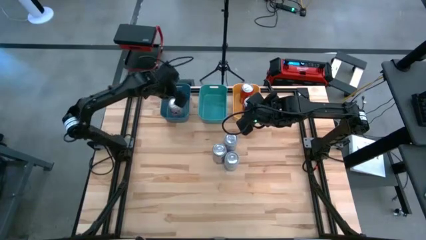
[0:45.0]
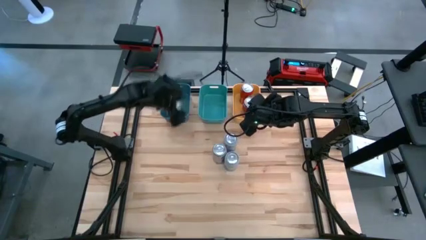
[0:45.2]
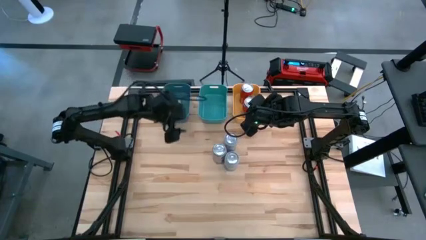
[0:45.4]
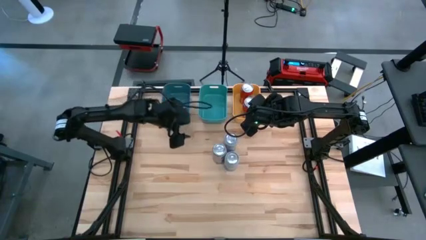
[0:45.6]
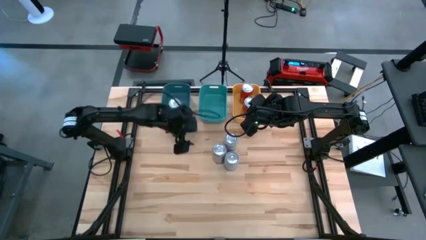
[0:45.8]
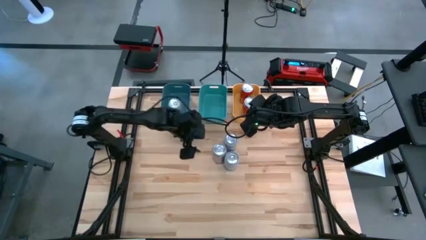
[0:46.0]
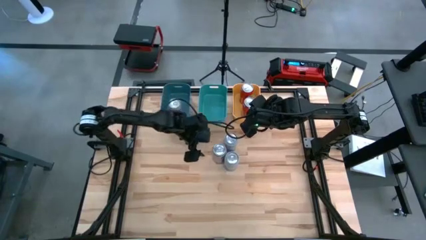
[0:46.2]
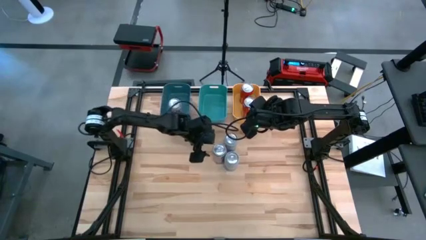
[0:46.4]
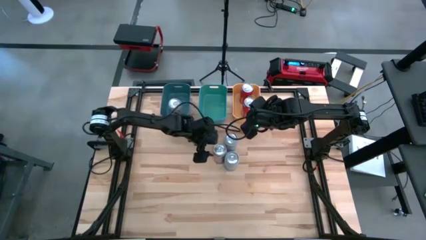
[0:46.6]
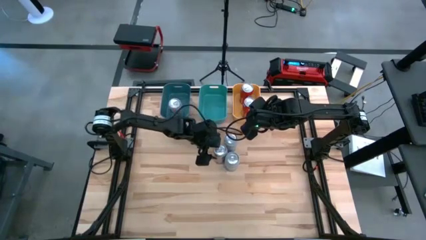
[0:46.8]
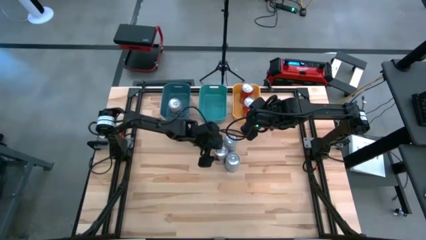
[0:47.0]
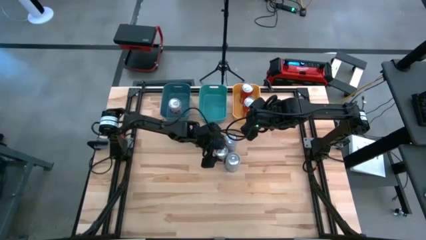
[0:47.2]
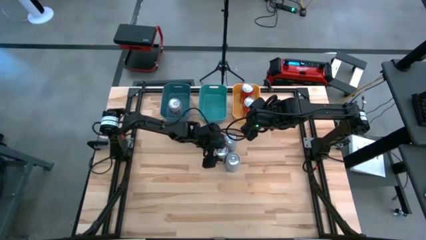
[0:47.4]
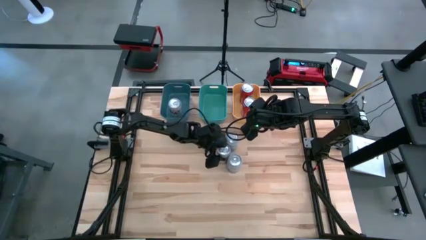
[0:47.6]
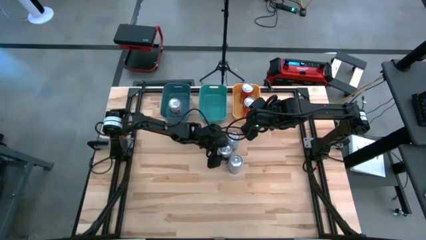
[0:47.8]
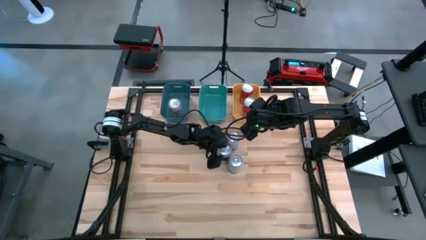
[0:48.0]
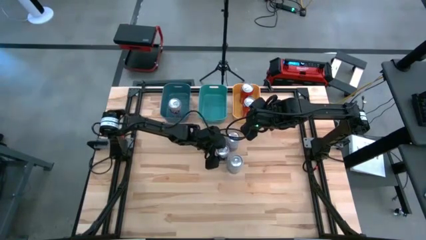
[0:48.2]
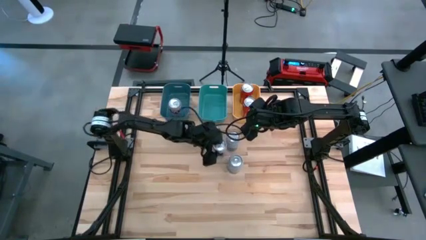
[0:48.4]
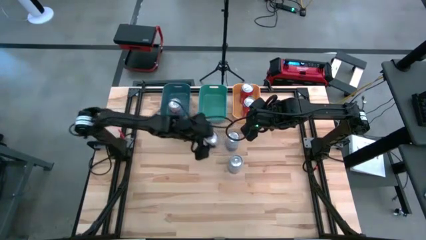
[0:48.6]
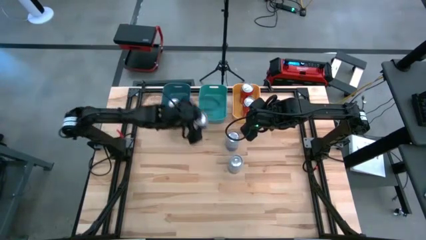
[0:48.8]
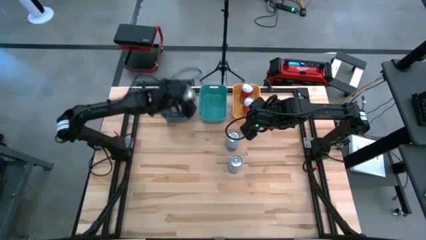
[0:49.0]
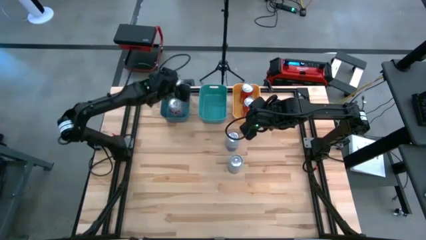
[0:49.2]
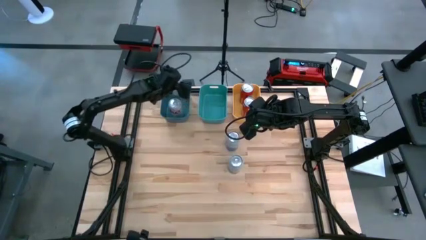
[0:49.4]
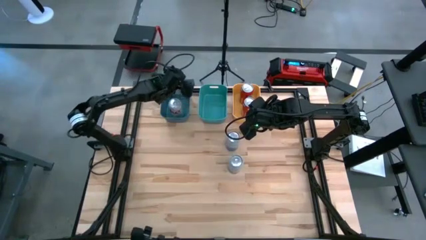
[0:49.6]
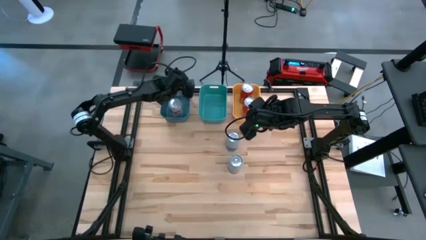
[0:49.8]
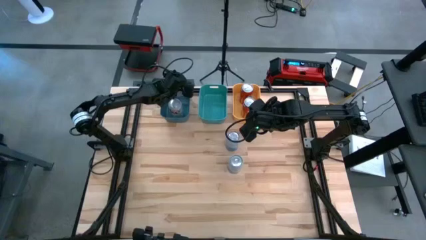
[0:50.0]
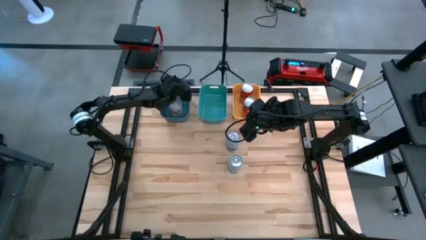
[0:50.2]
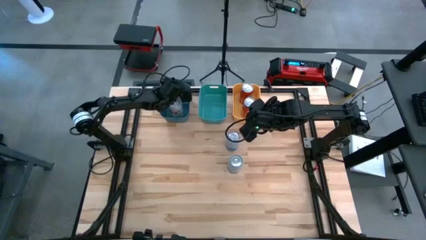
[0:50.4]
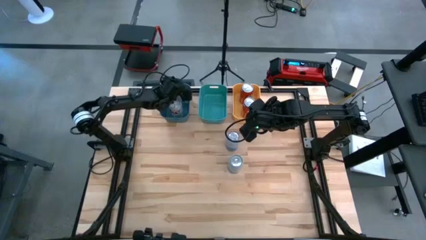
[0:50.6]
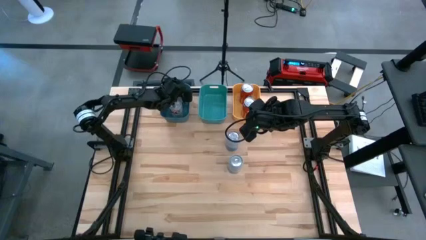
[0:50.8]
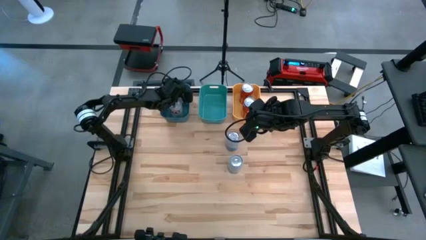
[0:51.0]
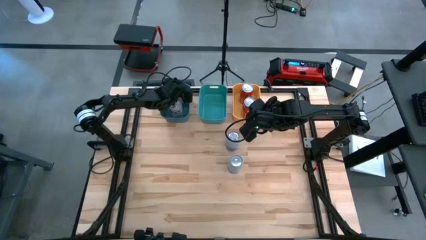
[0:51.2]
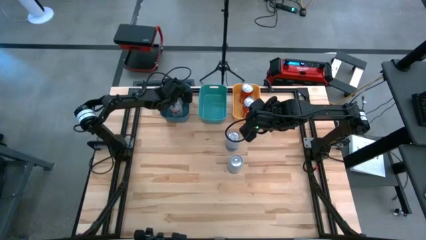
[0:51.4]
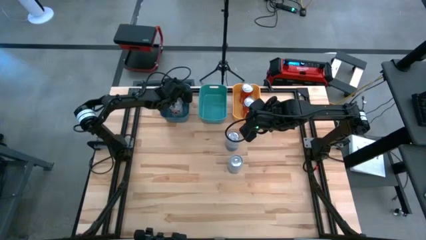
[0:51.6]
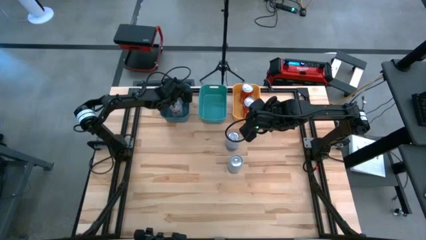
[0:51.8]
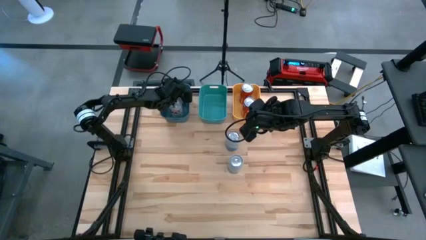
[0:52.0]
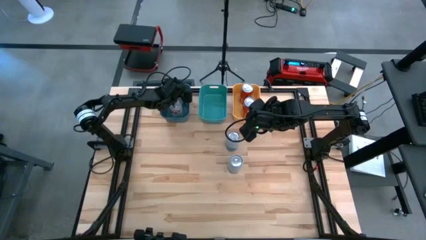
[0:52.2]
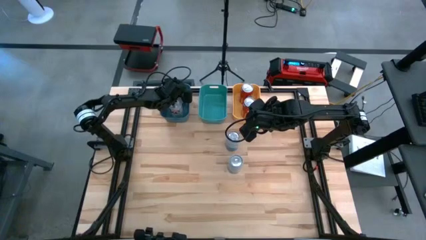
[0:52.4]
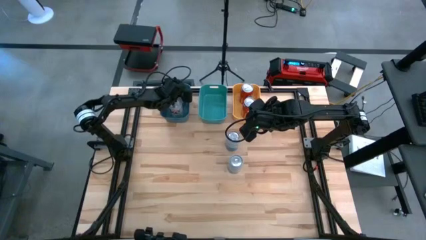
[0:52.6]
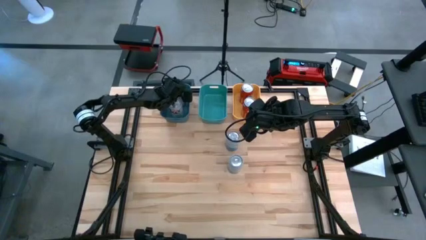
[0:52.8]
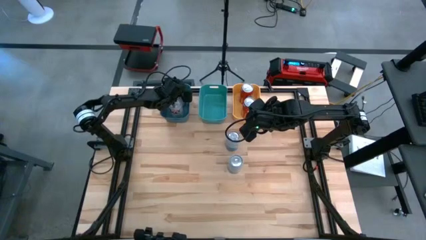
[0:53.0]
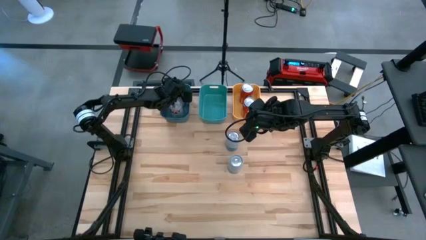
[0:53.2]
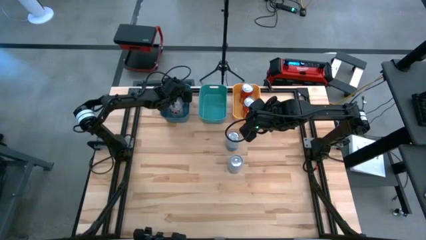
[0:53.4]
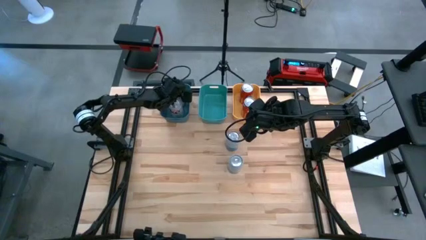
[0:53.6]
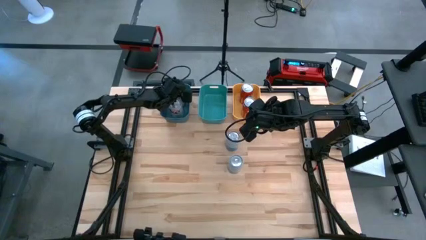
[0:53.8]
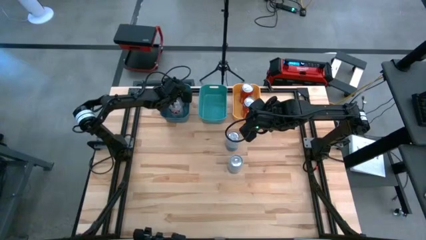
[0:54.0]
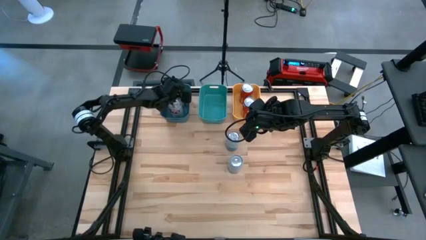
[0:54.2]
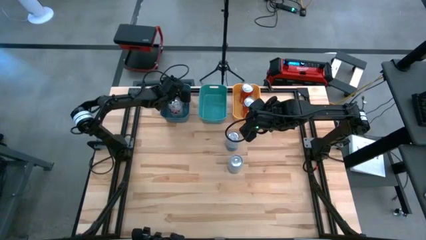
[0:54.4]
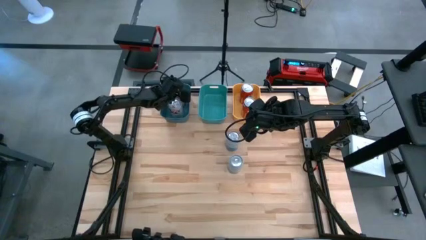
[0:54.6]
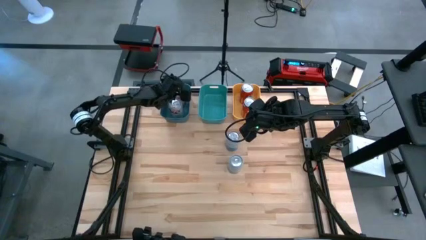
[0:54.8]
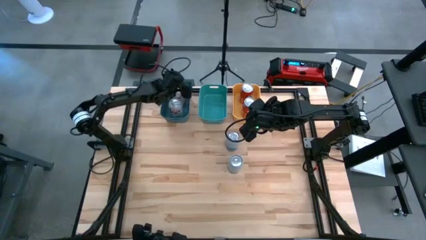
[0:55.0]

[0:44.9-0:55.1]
Task: Sort soda cans
Put the red-silver soda can into the blue bin

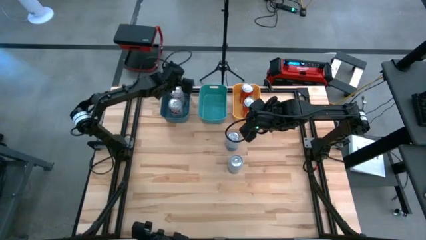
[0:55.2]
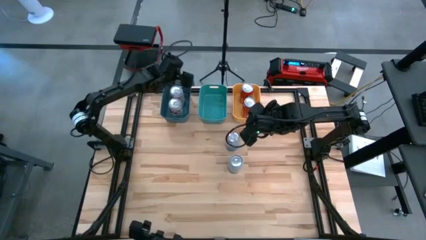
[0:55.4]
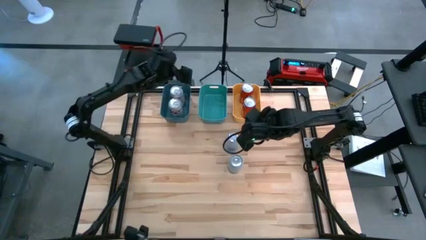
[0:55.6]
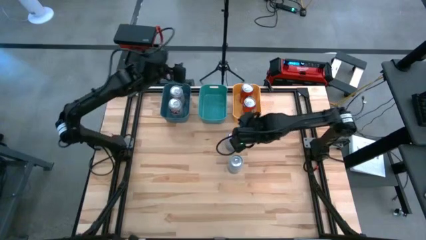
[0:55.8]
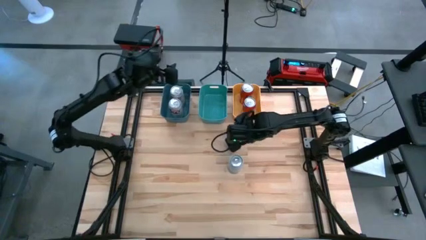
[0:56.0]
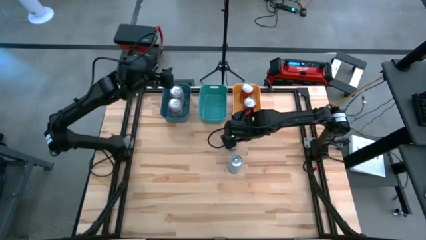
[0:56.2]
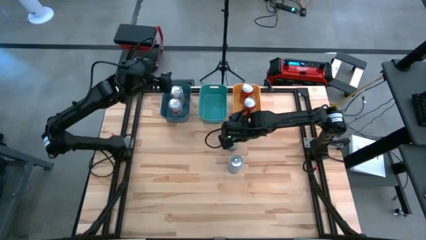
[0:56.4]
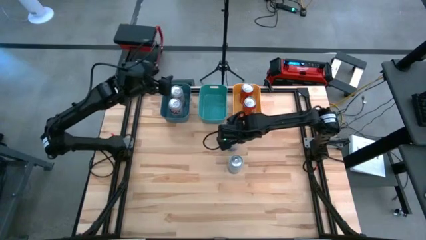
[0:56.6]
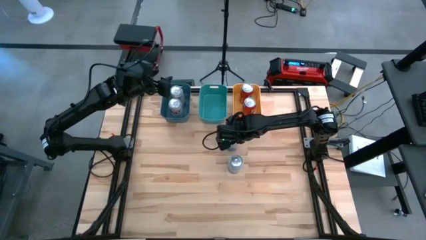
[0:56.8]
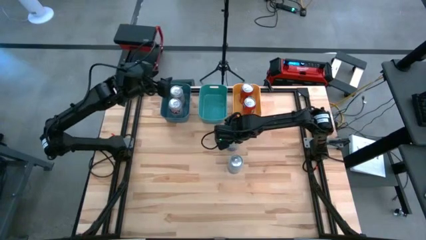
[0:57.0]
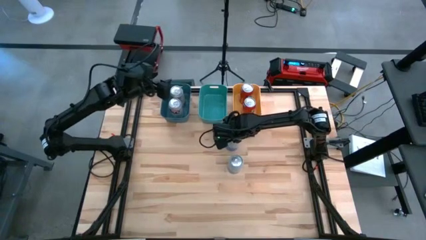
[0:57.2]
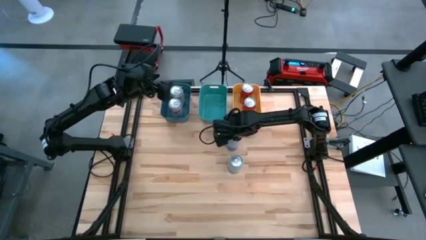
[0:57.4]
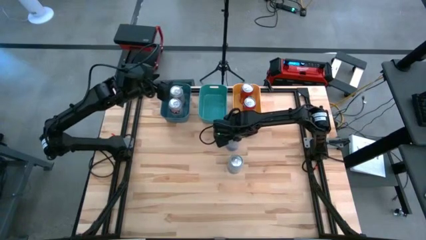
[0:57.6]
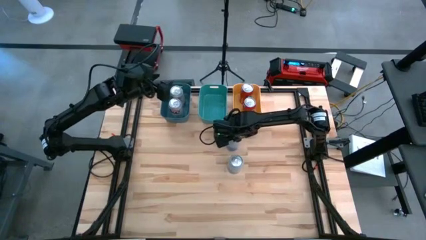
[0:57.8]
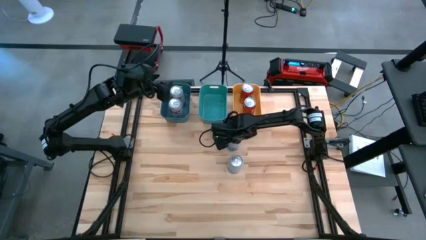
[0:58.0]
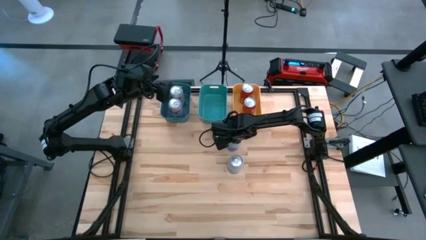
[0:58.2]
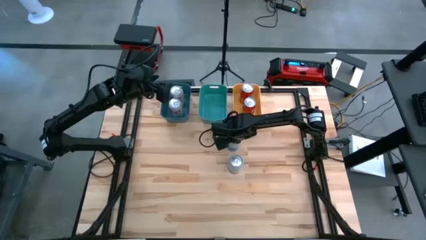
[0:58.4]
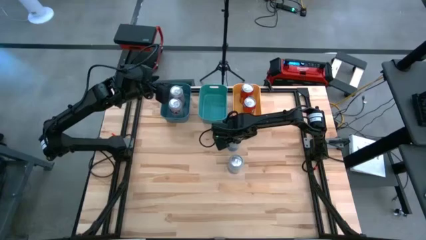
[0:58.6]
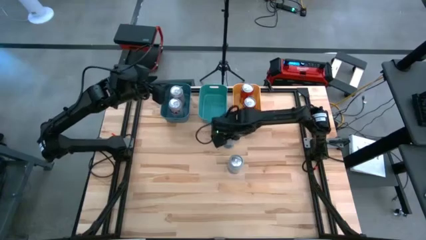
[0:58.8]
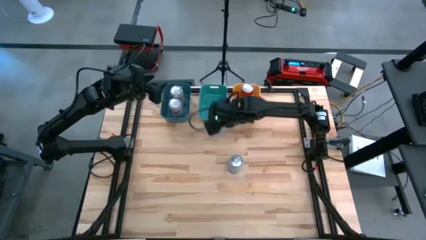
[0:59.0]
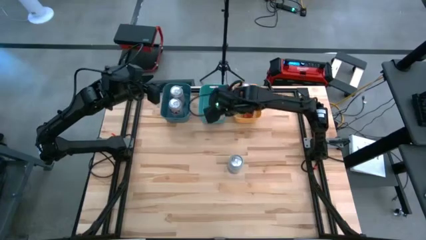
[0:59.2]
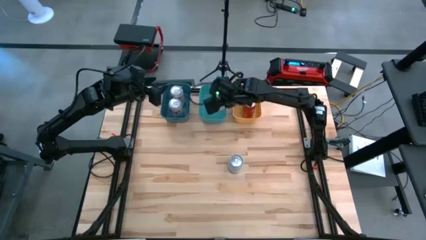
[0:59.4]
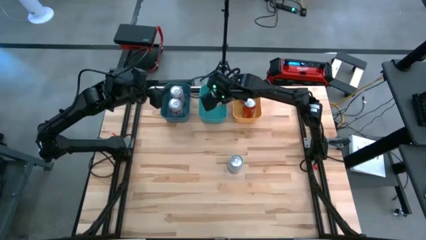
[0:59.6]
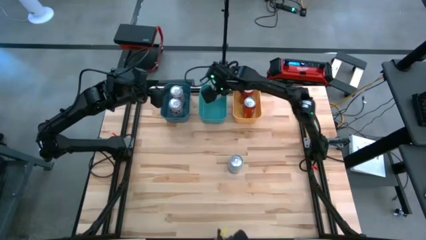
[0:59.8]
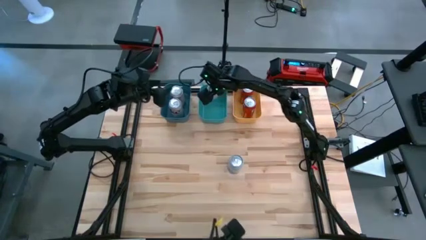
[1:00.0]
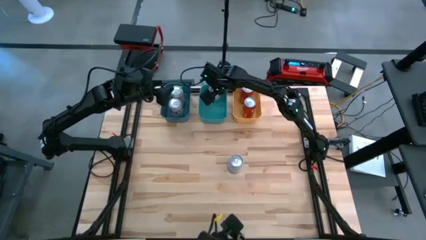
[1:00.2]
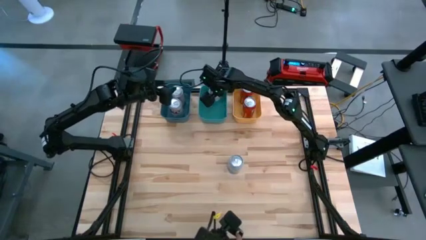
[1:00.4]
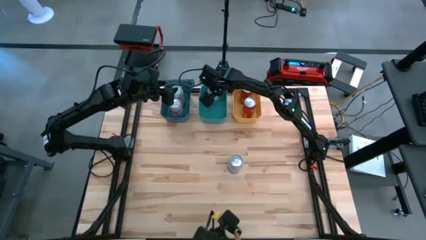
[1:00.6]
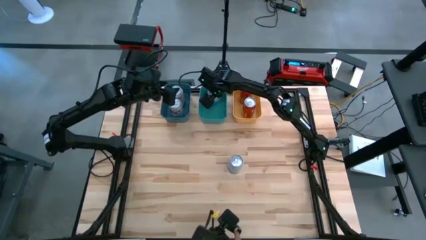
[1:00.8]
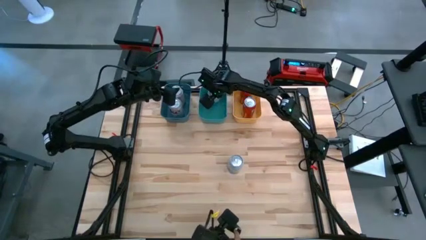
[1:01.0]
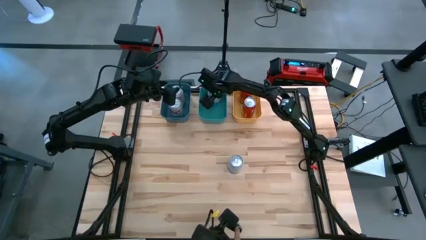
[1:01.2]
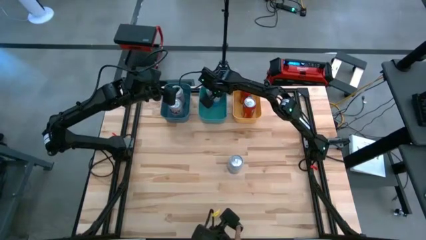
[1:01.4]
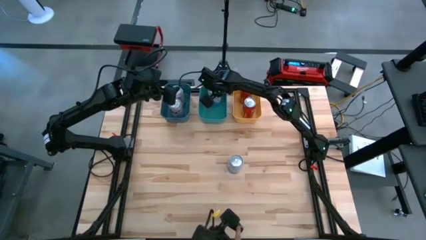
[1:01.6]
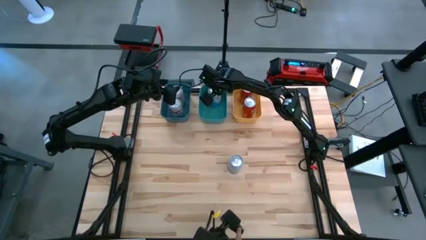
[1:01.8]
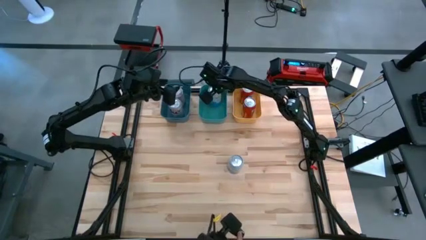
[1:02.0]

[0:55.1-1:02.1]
Put the top blue-white soda can into the green bin
